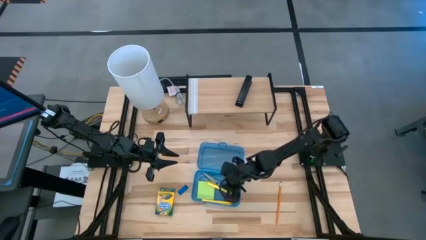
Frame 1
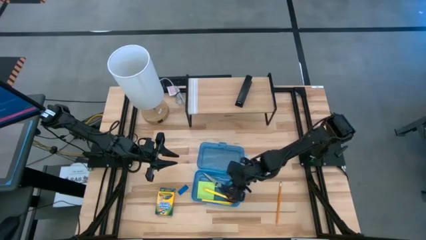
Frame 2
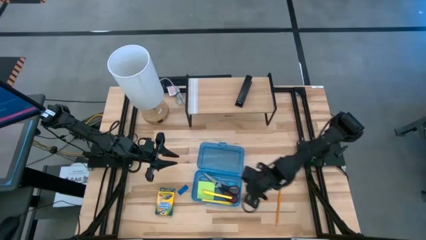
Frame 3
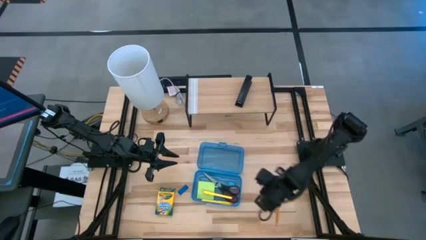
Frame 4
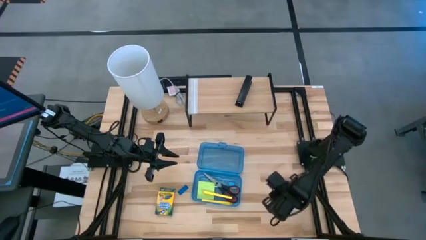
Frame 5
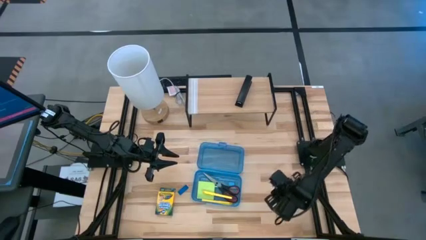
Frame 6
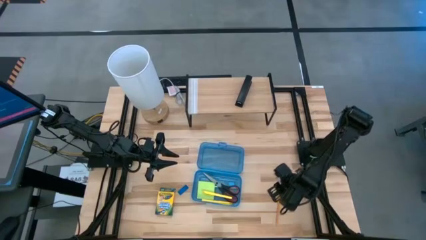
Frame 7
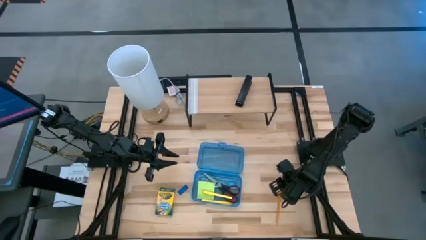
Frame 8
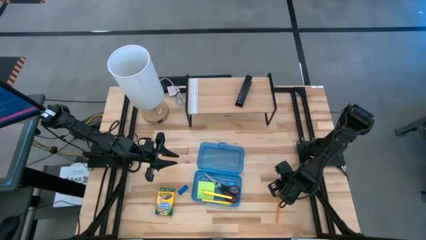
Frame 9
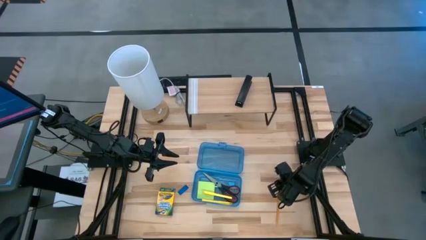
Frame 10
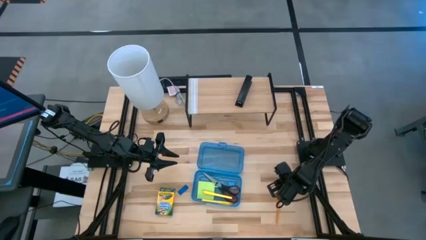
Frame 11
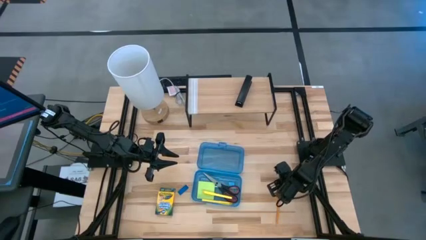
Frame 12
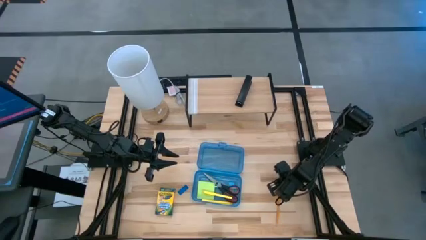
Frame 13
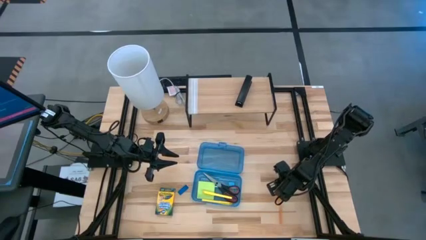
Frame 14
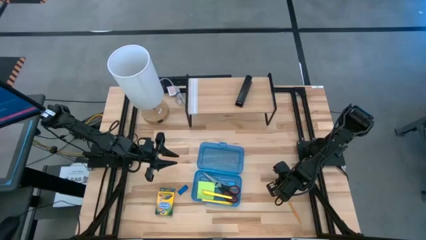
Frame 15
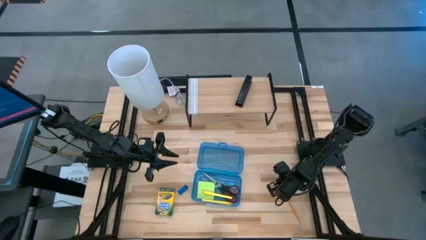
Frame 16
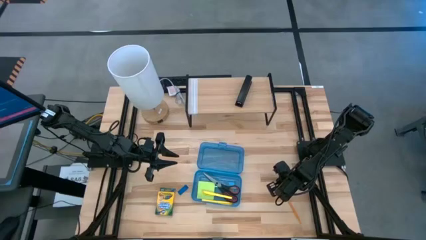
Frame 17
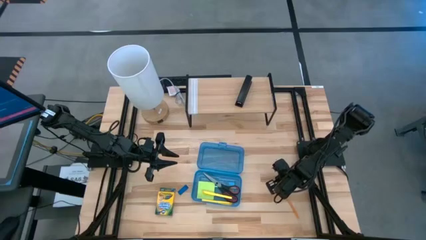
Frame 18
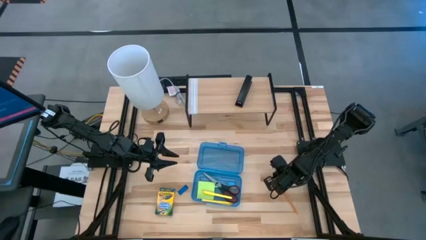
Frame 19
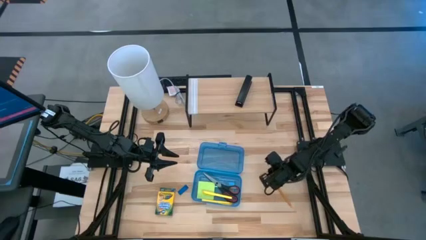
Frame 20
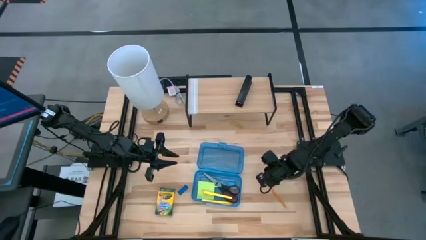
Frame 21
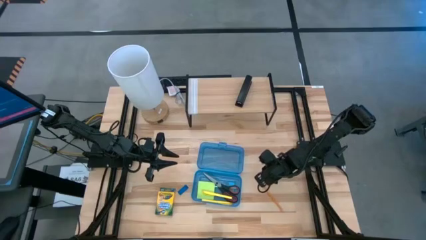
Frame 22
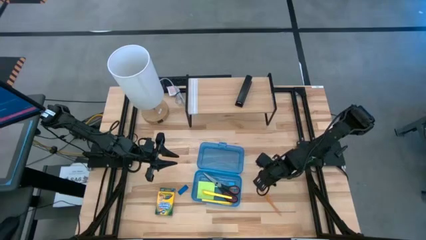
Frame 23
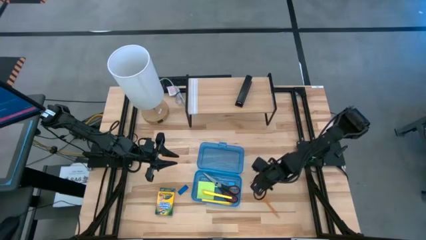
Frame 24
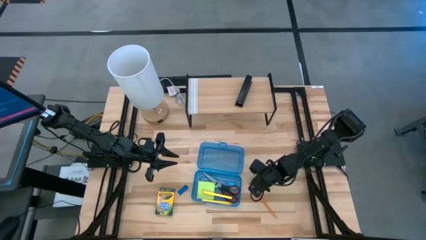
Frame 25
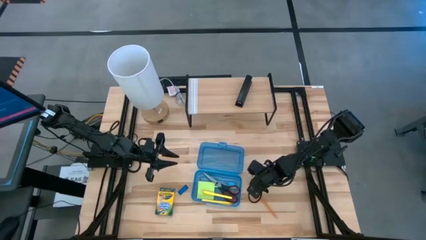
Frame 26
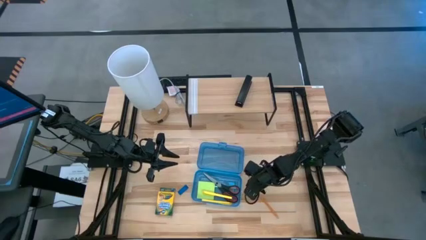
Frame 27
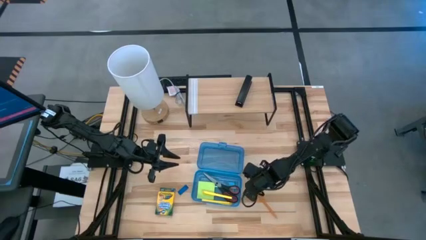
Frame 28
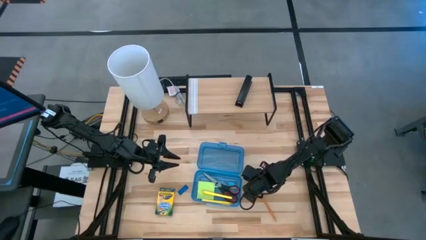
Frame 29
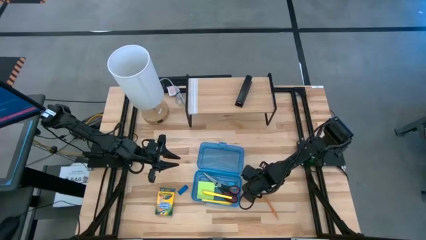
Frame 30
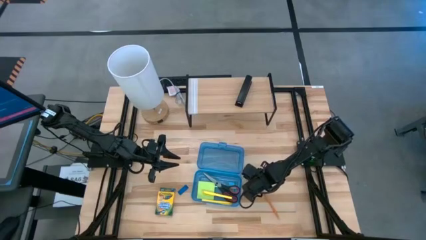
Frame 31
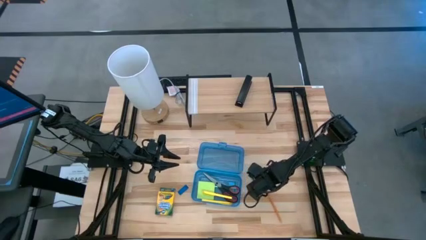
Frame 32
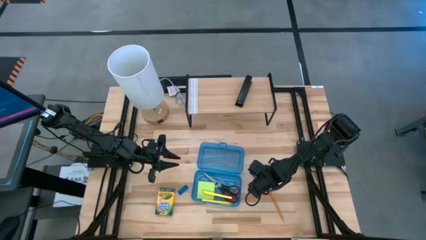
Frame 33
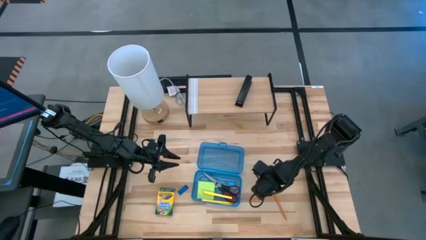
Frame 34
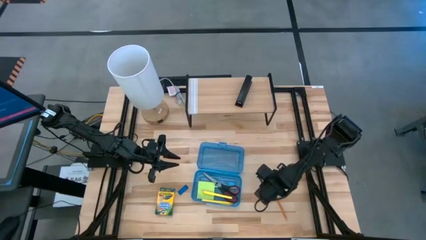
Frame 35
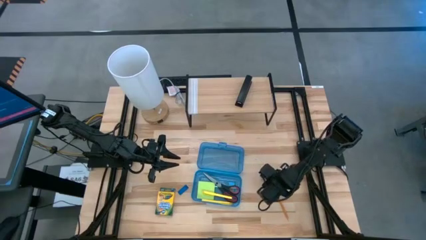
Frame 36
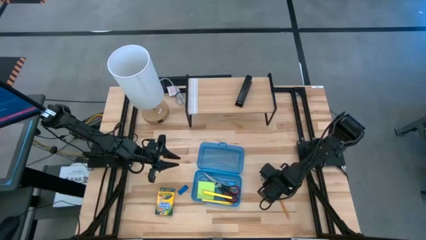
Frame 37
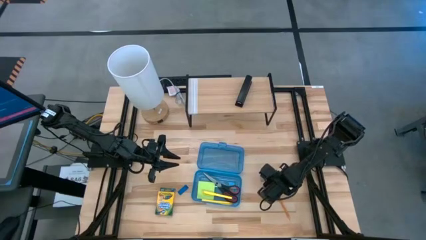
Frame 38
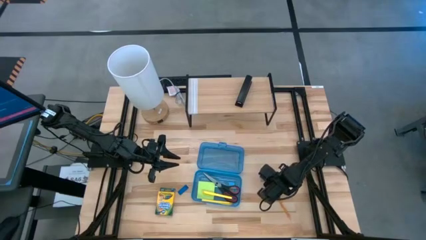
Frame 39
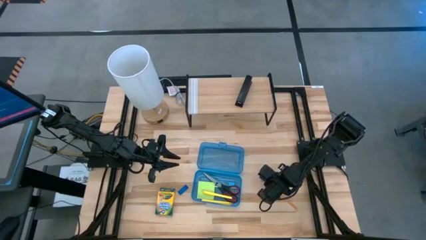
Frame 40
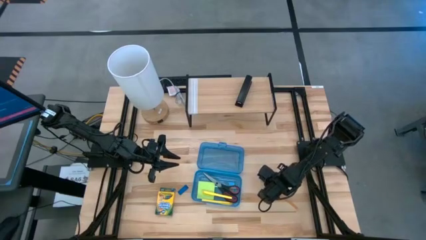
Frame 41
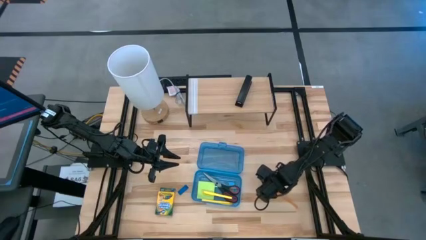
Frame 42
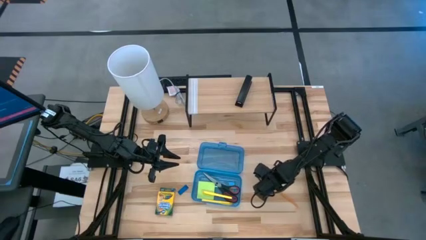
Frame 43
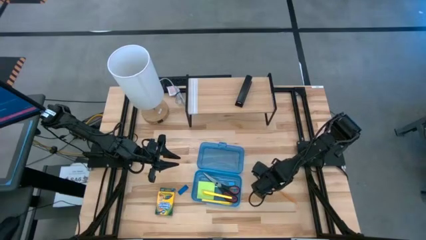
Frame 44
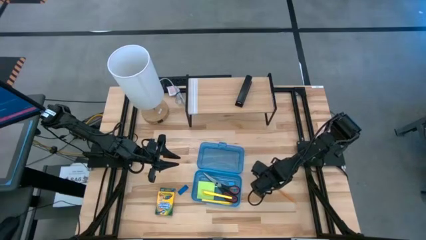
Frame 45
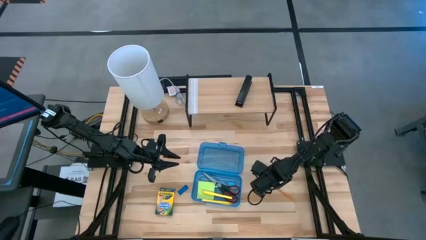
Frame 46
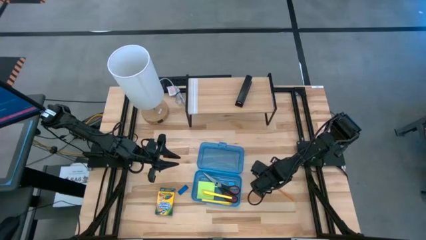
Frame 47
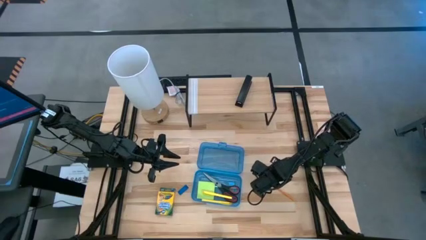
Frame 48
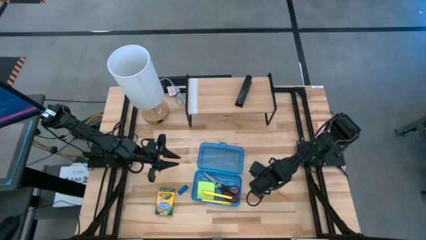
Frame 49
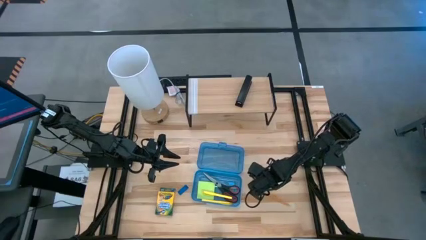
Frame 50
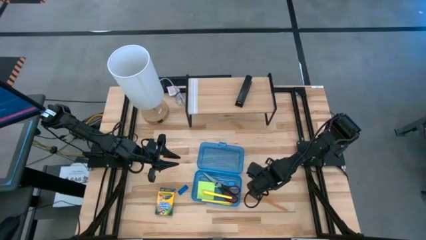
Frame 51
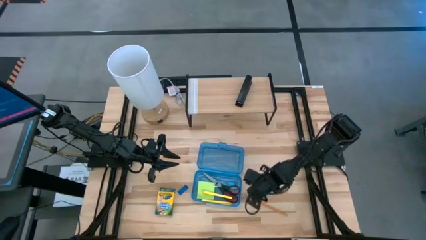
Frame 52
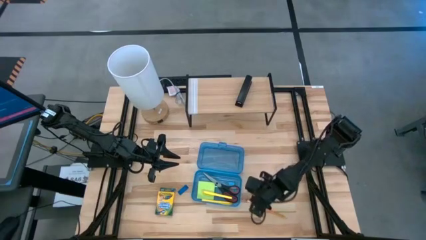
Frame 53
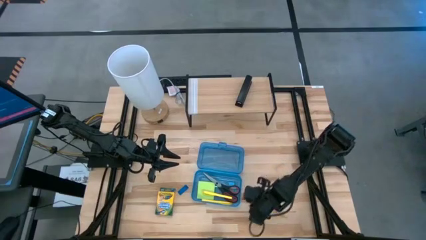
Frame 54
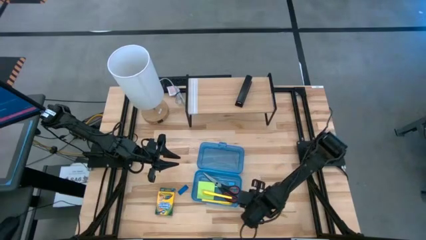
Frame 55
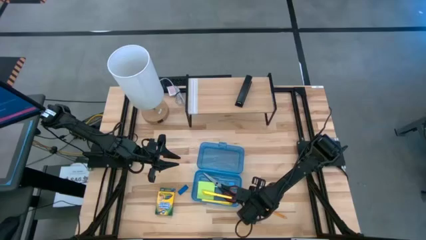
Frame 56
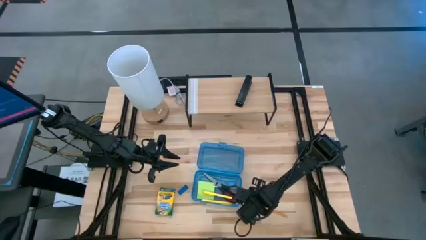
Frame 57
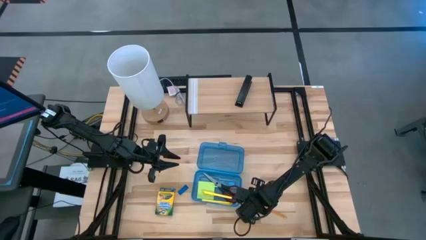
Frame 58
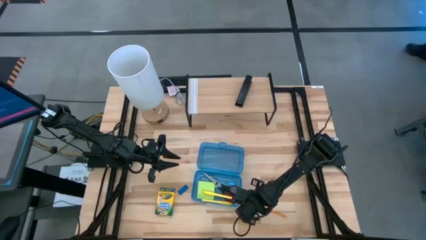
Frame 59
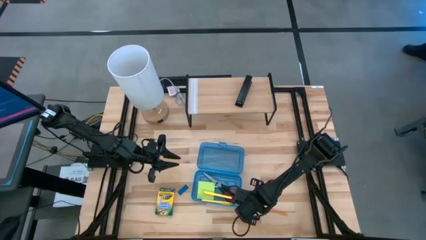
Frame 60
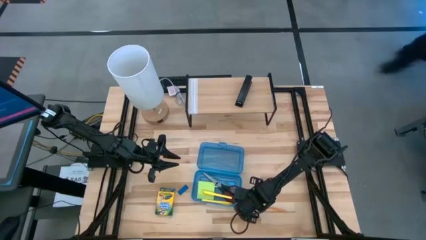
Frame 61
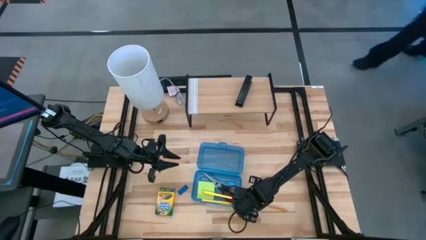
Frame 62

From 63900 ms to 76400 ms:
Task: Pack school essentials
Put the brown pencil into the blue supply box

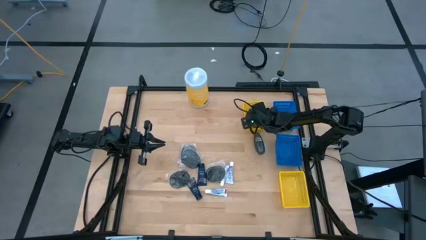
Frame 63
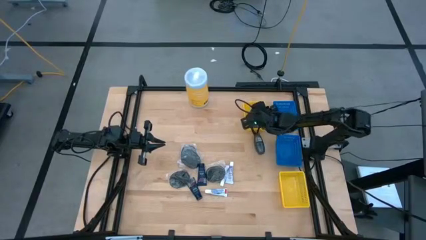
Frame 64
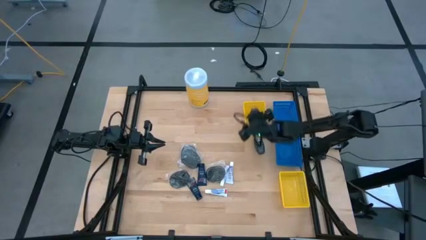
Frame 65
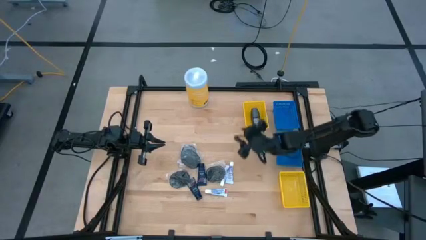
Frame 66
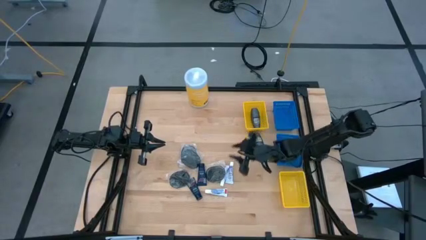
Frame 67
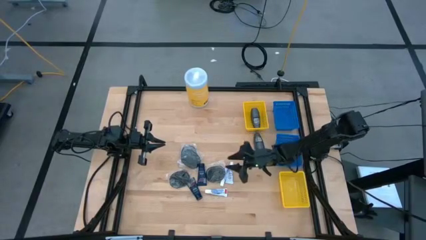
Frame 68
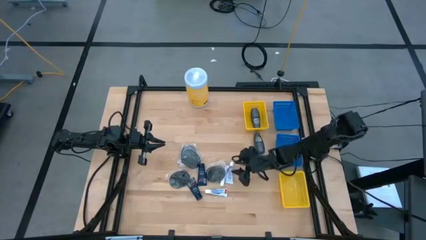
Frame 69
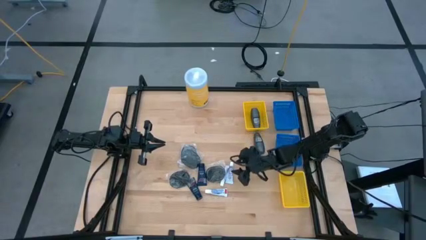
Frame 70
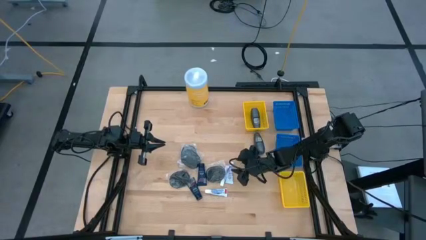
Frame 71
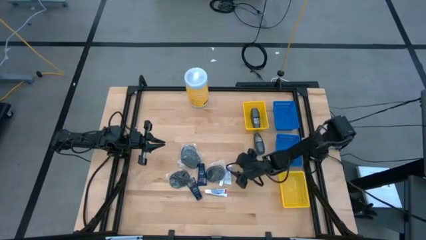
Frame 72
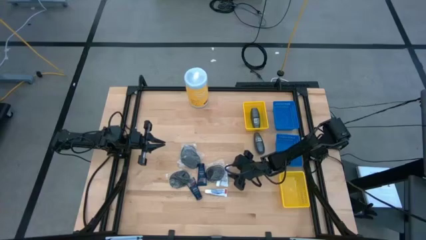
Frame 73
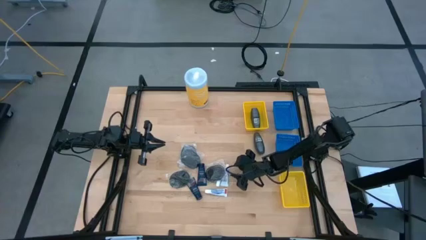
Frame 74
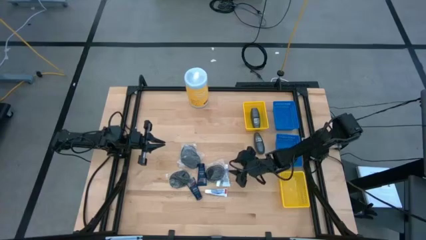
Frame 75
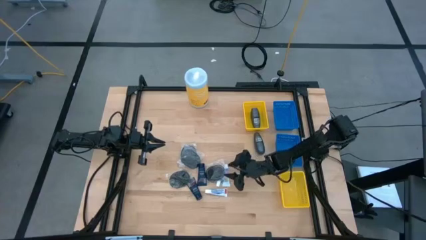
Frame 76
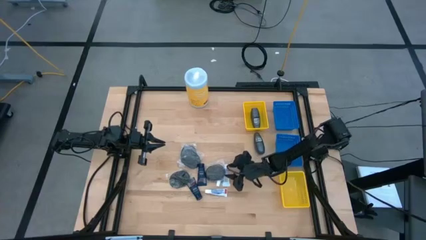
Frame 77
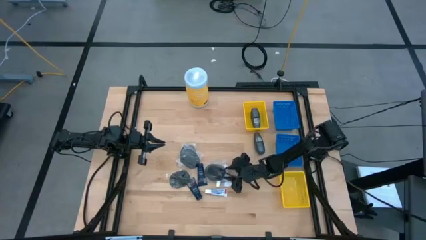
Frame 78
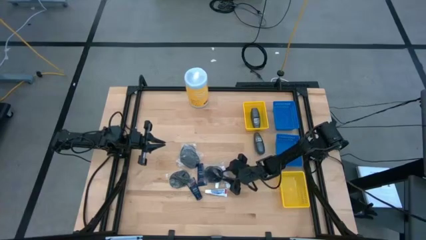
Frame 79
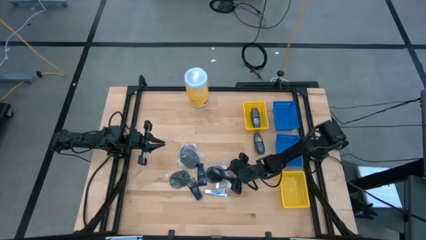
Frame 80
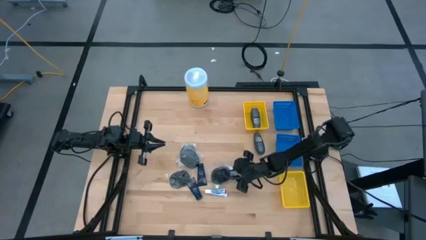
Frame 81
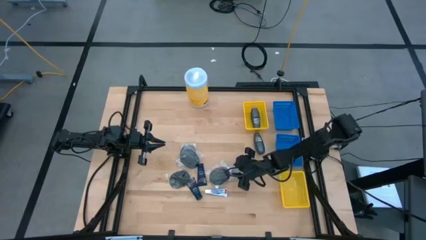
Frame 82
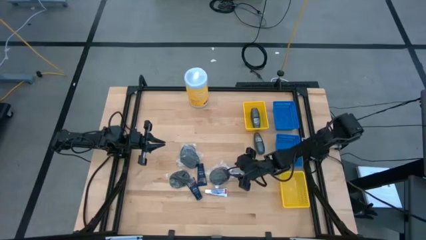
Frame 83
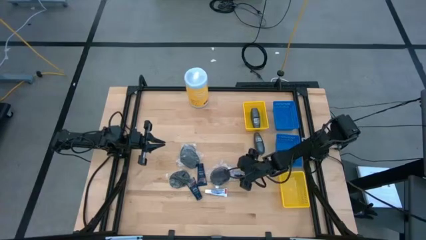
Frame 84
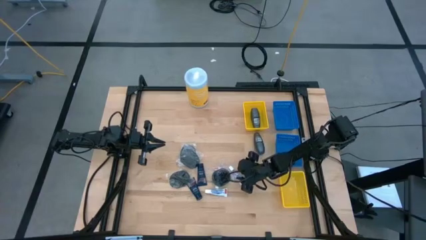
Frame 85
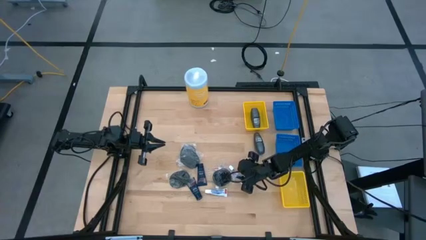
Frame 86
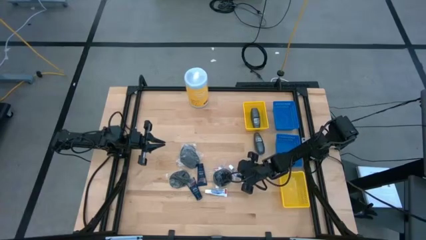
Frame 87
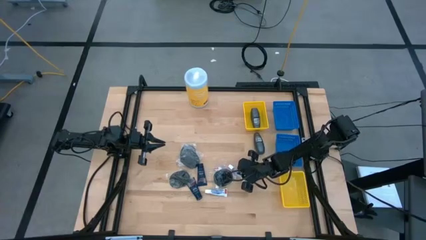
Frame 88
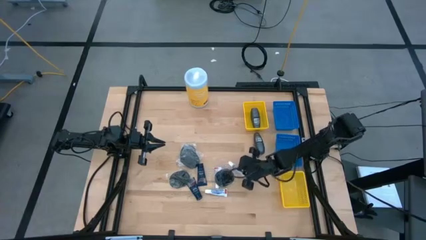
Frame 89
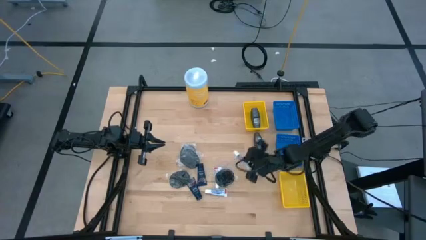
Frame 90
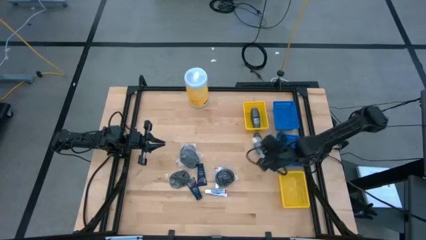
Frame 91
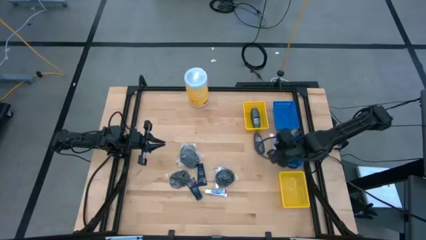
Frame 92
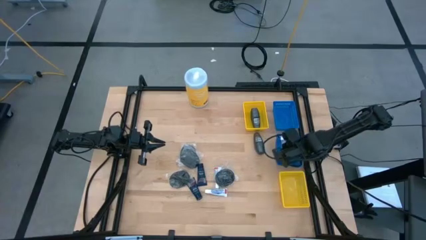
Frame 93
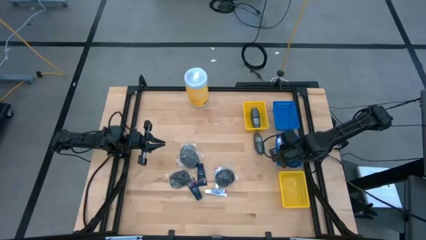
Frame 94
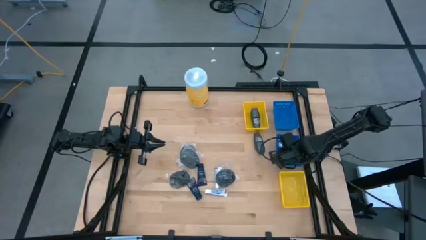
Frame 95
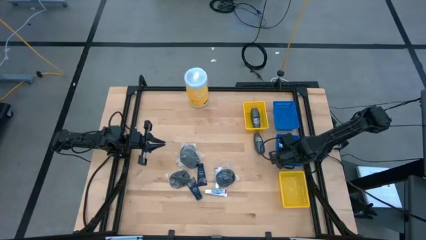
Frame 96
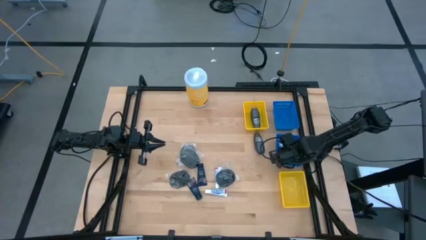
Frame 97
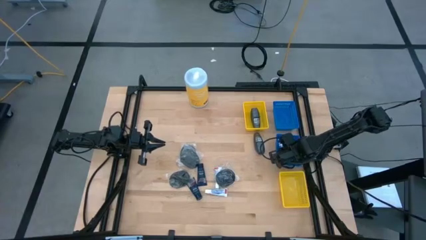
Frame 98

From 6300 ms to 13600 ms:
Task: Pick & Place Travel size toiletries
Put the top right white toothpaste into the bottom blue basket
